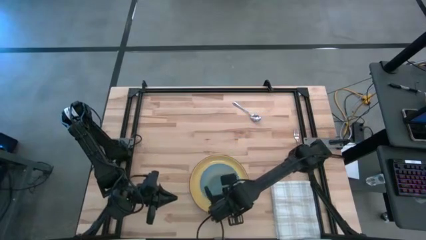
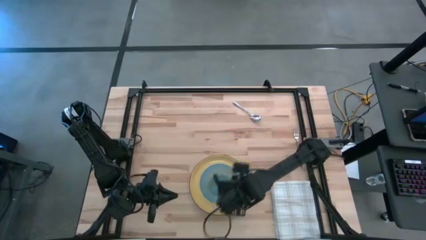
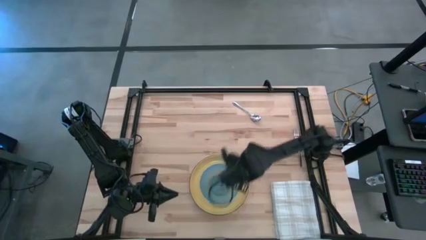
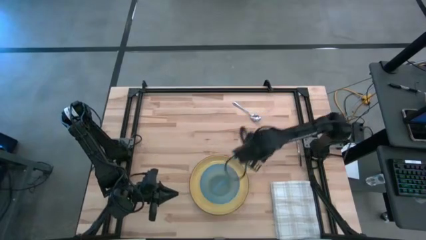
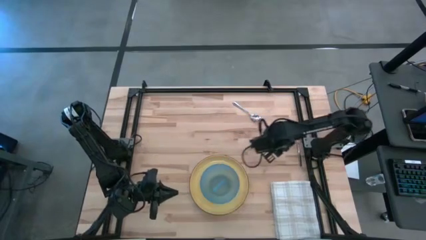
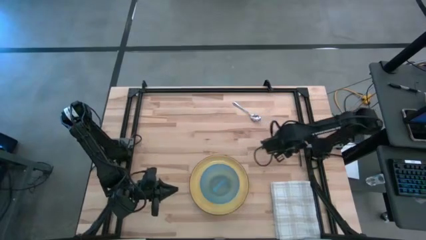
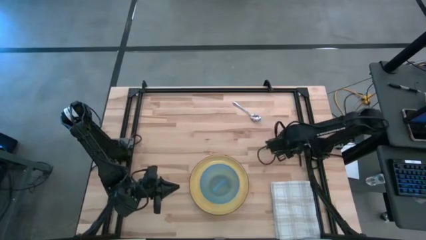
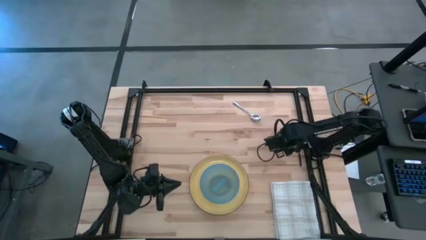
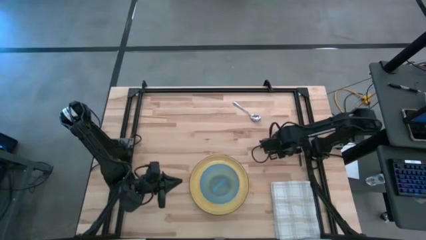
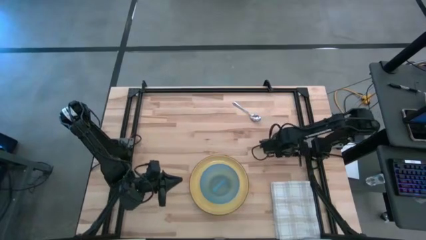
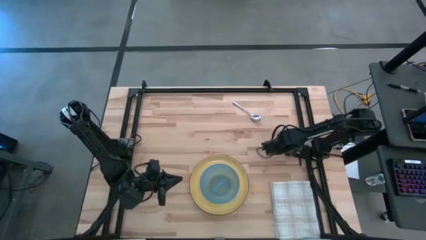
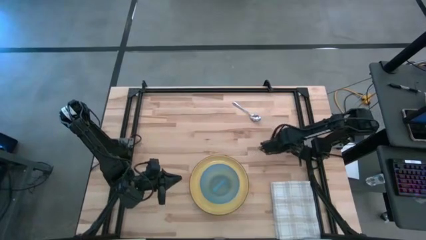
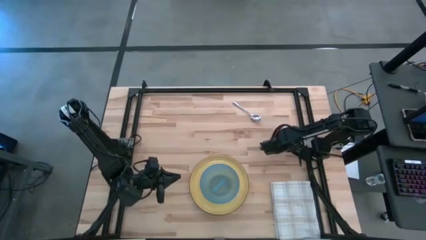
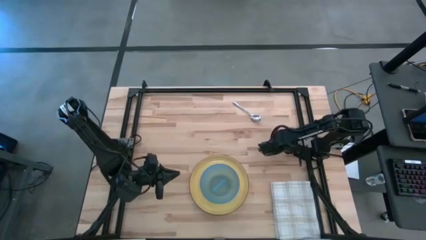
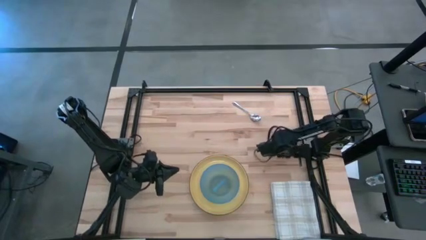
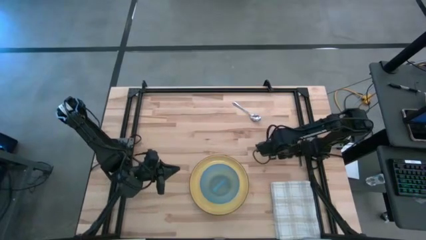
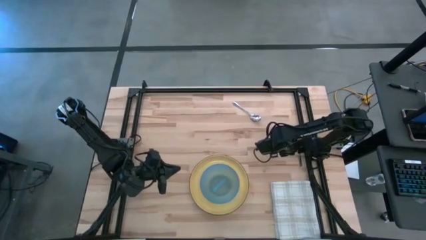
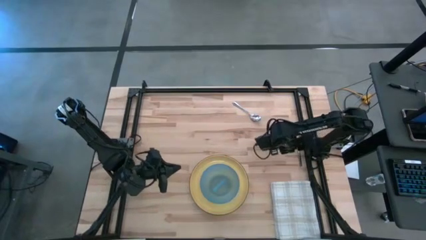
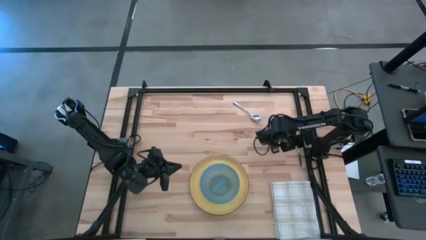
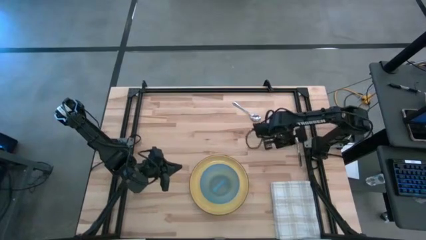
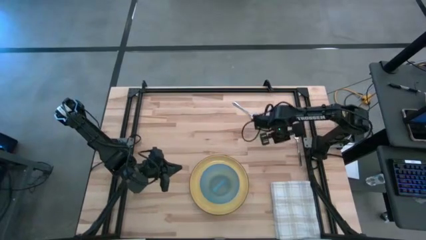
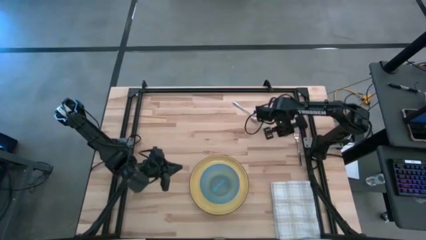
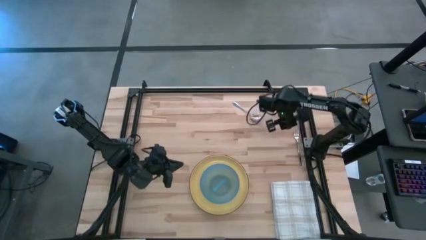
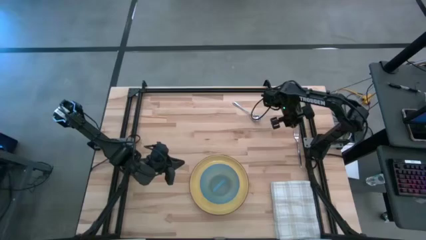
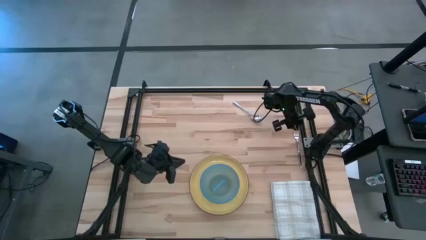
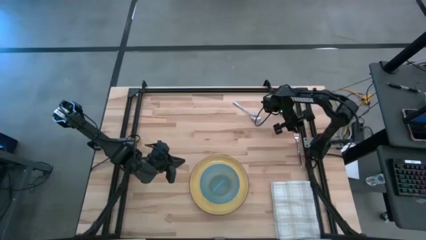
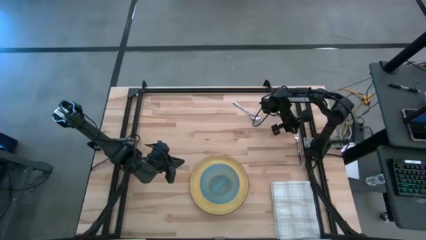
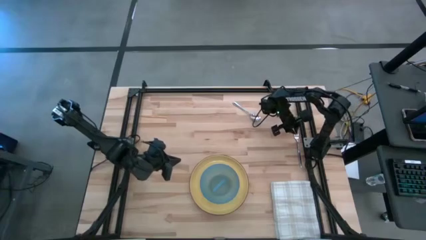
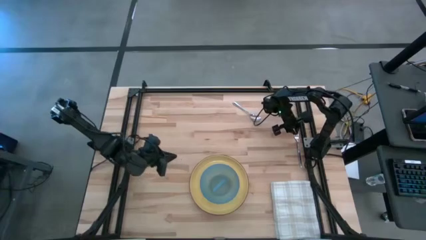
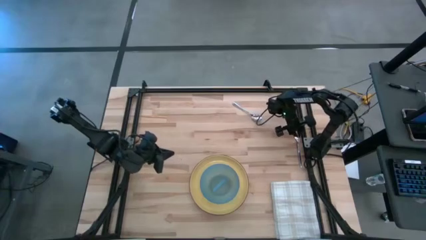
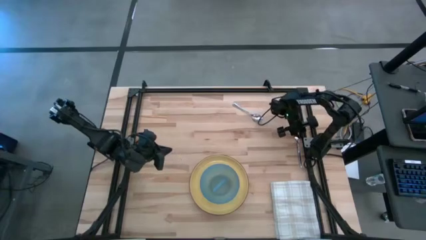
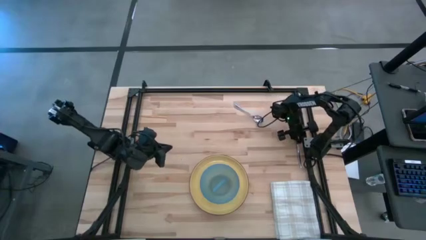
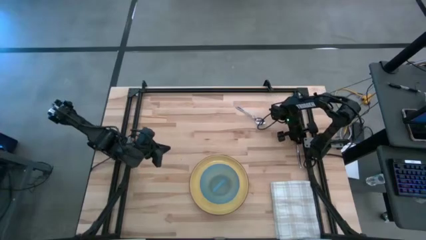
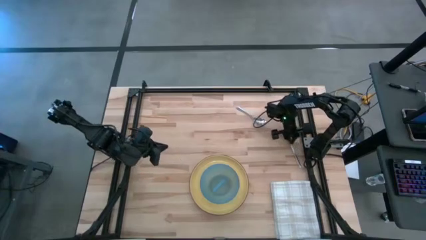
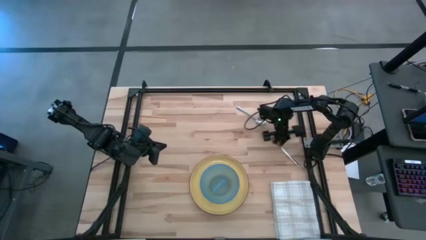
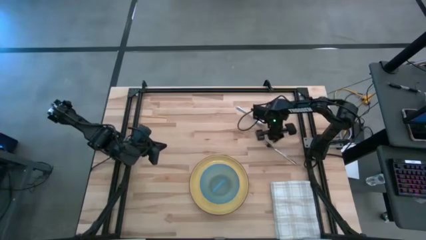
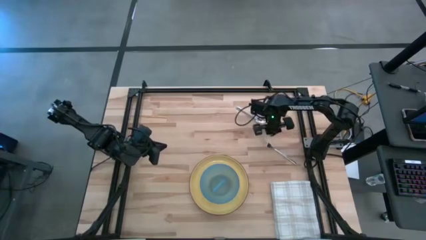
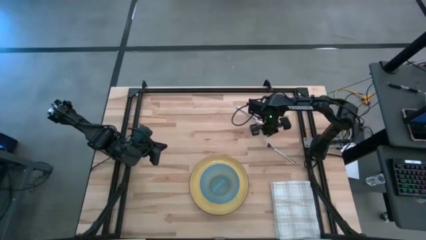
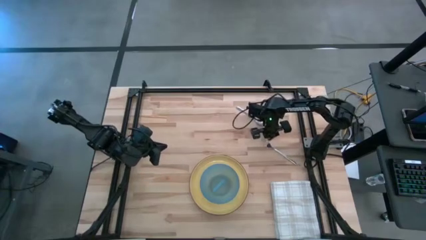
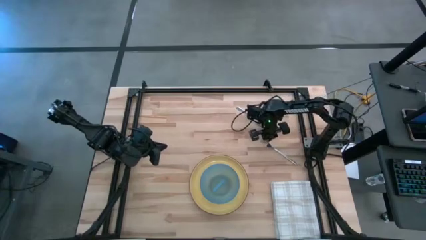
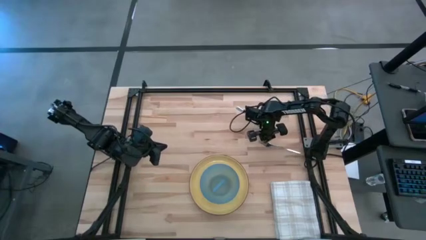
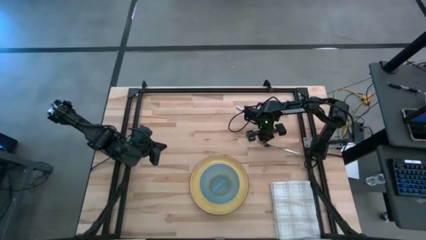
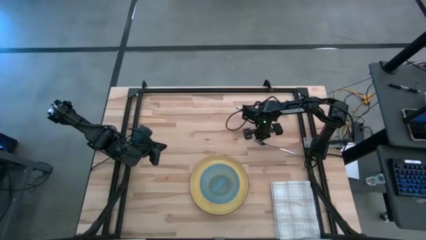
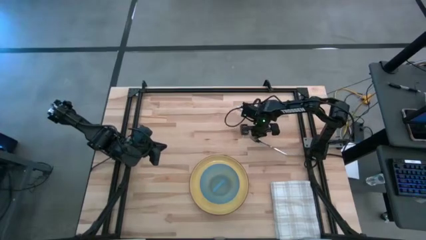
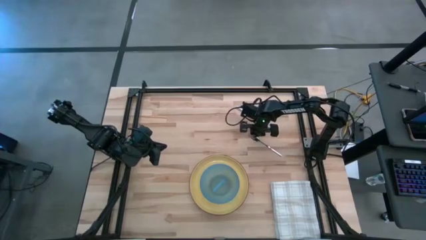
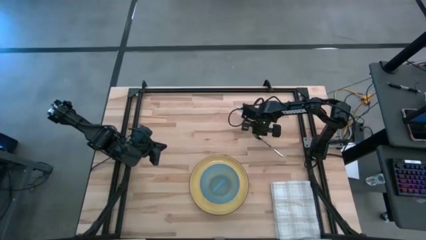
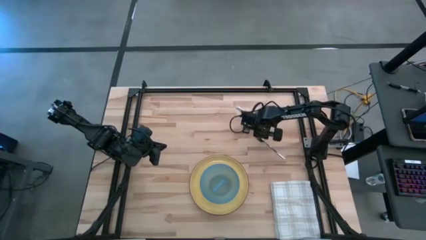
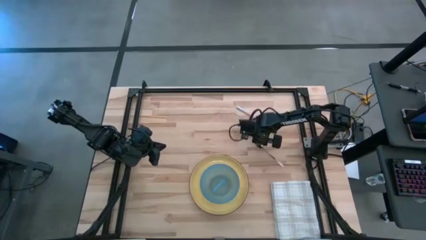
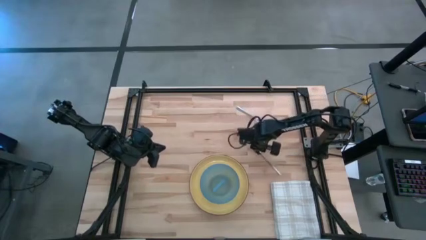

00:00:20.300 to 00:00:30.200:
Task: Set table place
Move the silver fork to the right side of the yellow plate on the table
